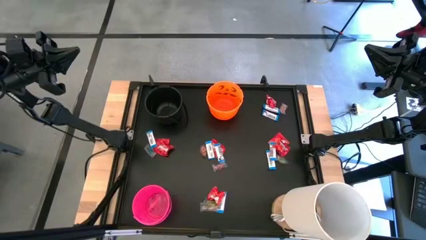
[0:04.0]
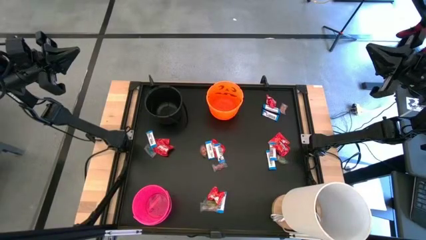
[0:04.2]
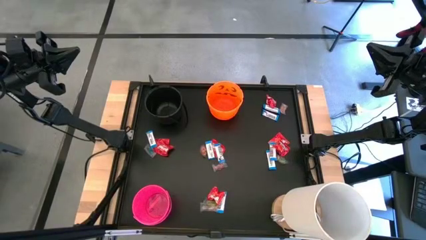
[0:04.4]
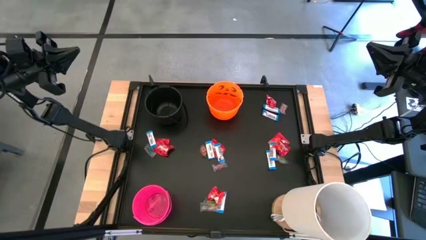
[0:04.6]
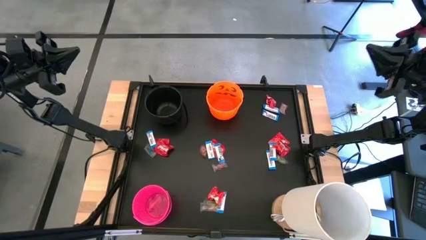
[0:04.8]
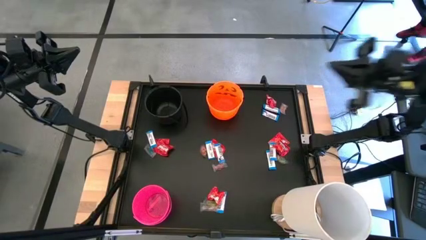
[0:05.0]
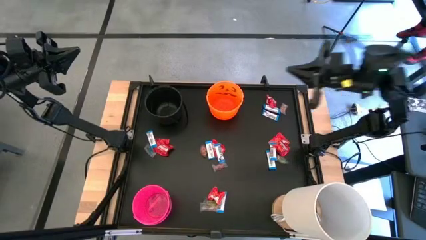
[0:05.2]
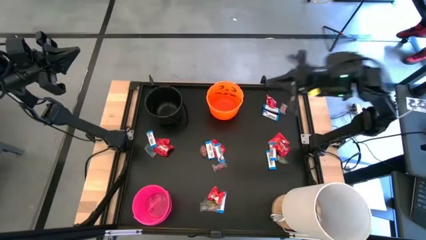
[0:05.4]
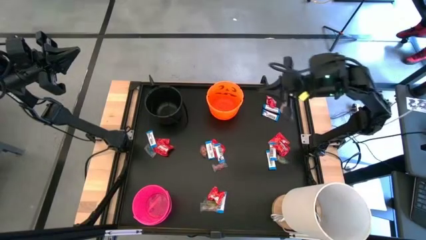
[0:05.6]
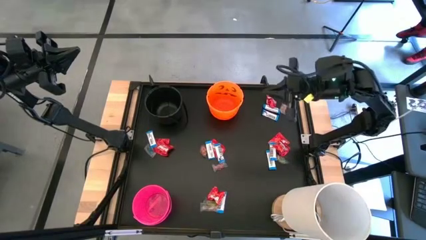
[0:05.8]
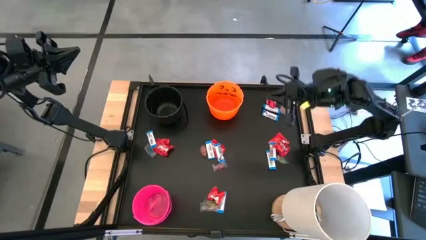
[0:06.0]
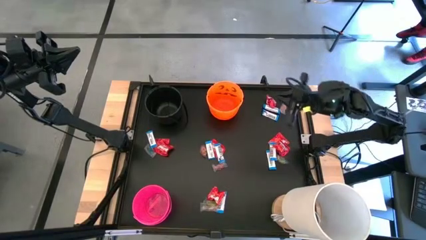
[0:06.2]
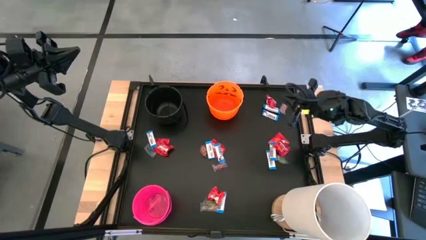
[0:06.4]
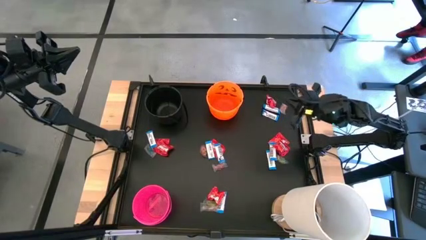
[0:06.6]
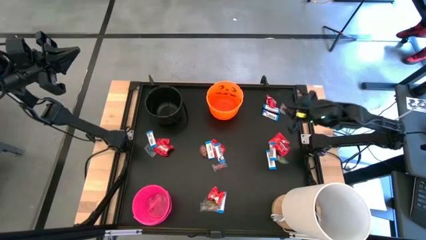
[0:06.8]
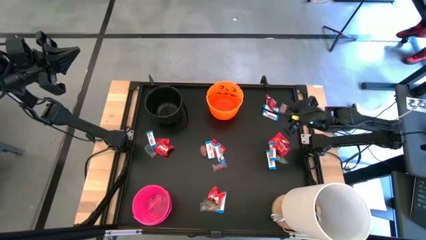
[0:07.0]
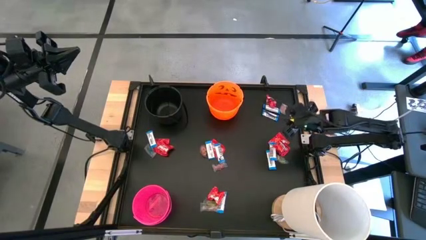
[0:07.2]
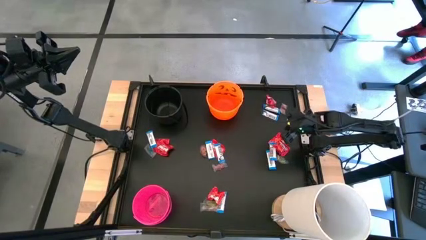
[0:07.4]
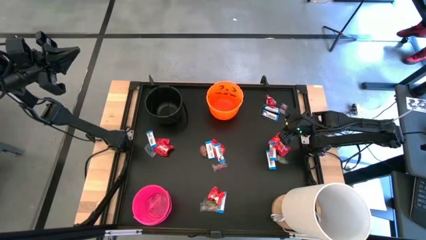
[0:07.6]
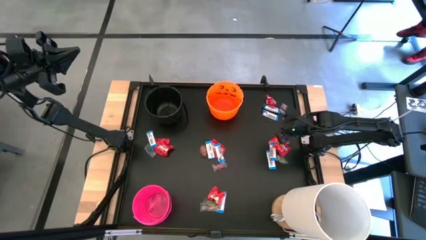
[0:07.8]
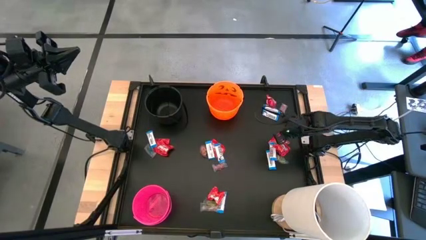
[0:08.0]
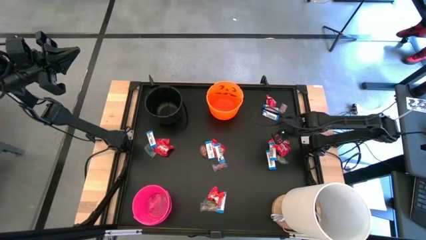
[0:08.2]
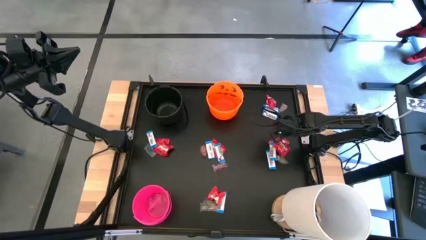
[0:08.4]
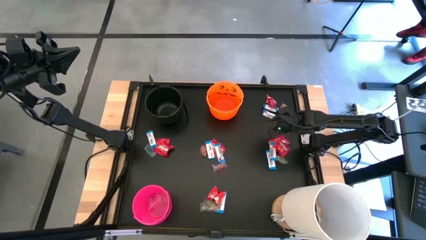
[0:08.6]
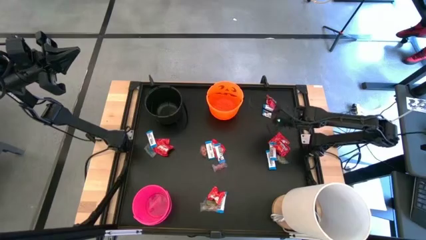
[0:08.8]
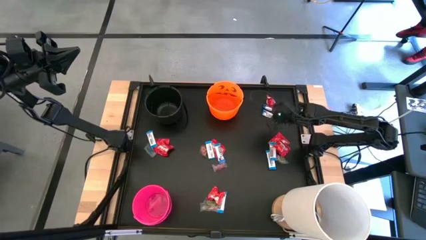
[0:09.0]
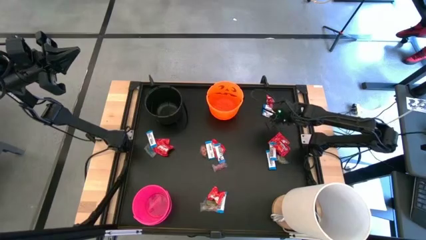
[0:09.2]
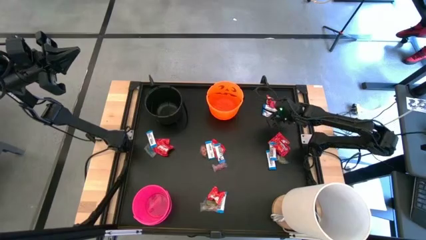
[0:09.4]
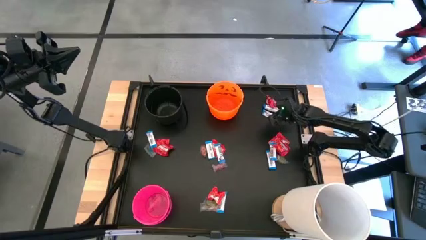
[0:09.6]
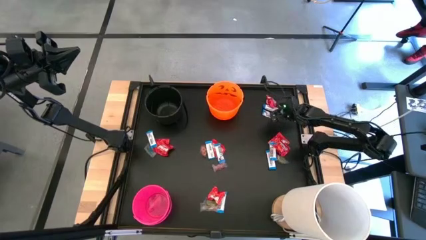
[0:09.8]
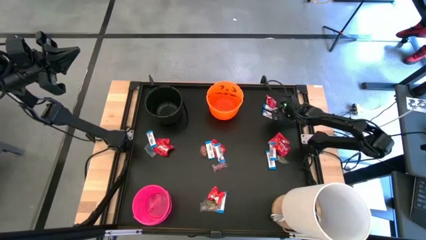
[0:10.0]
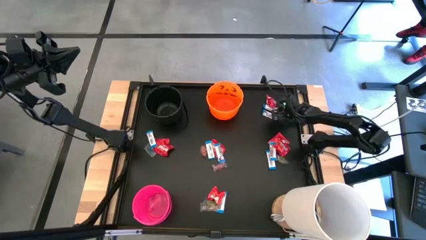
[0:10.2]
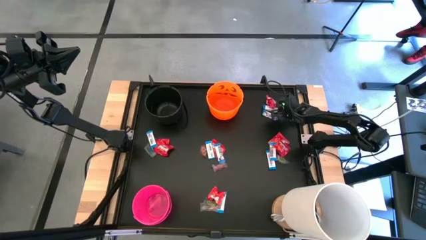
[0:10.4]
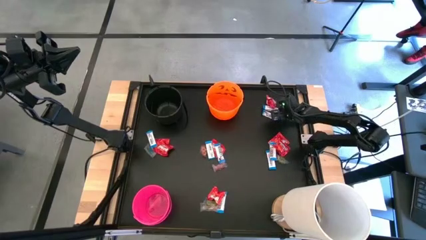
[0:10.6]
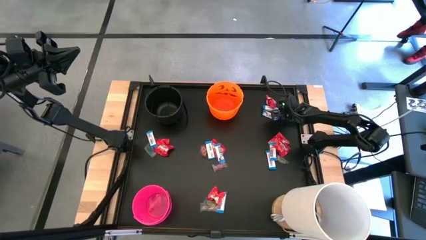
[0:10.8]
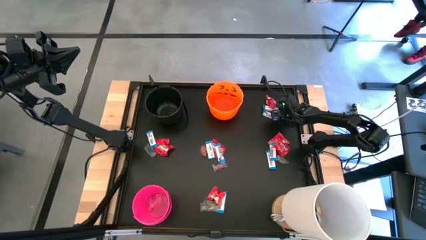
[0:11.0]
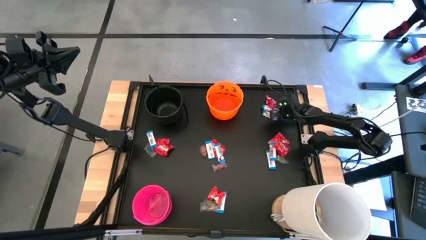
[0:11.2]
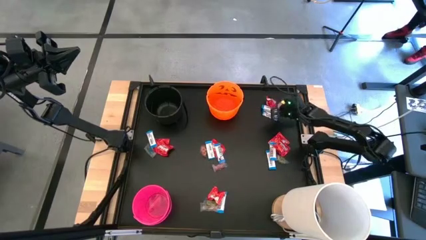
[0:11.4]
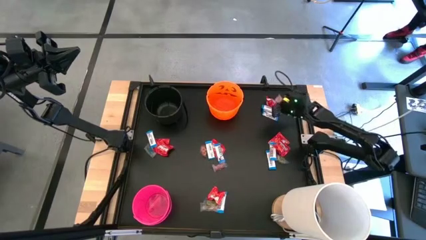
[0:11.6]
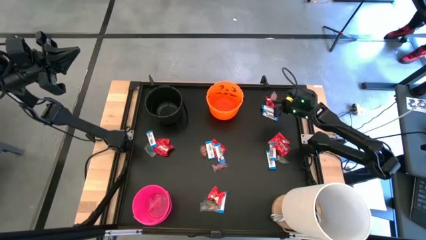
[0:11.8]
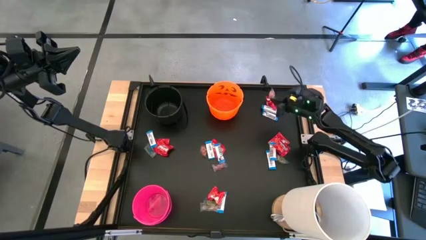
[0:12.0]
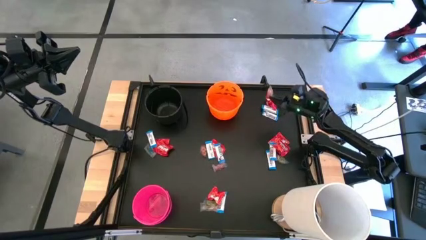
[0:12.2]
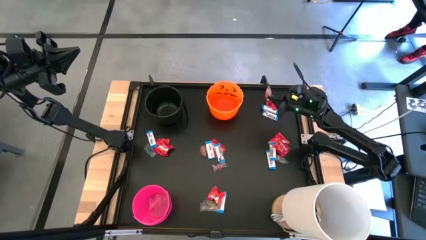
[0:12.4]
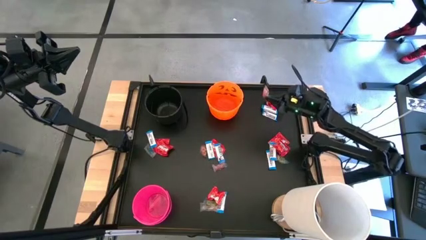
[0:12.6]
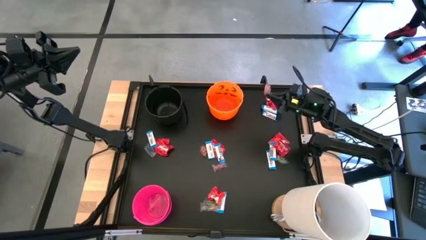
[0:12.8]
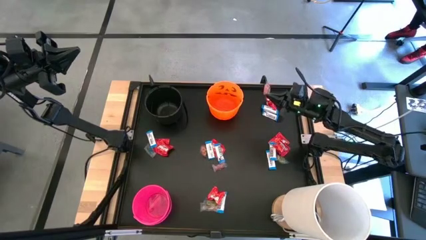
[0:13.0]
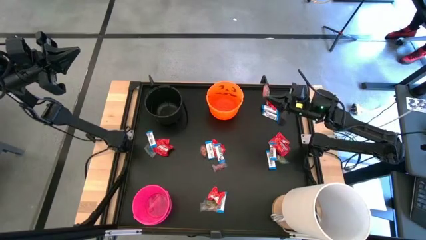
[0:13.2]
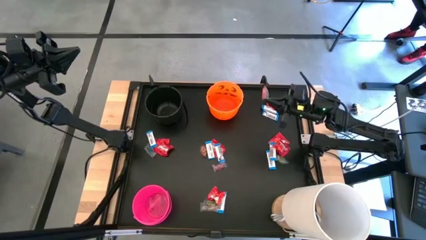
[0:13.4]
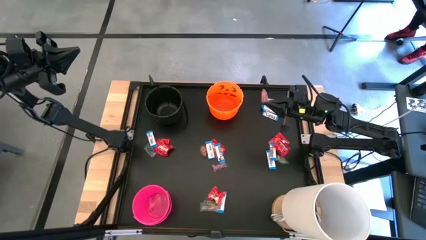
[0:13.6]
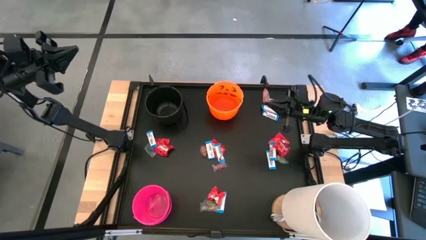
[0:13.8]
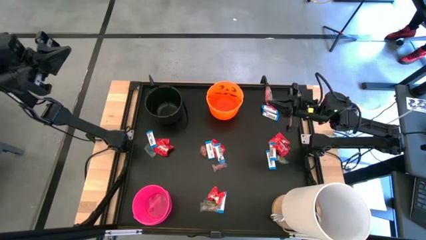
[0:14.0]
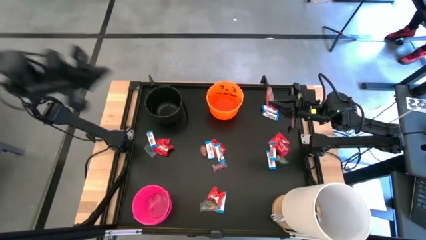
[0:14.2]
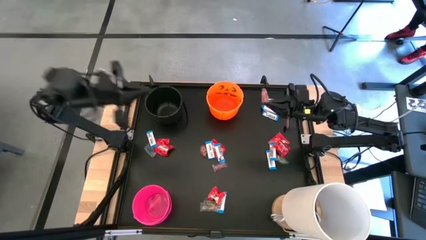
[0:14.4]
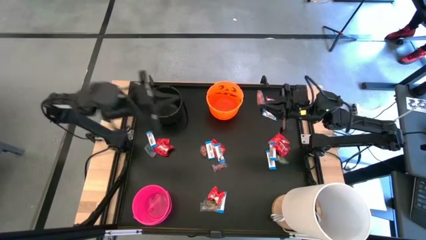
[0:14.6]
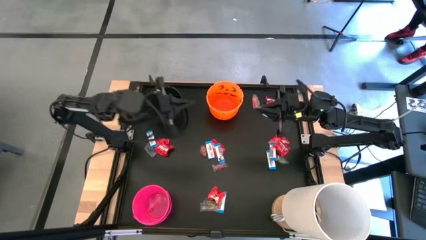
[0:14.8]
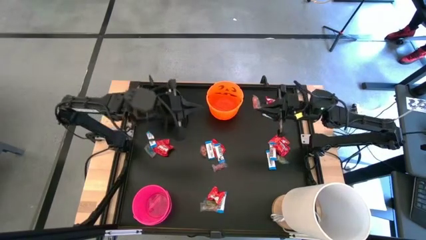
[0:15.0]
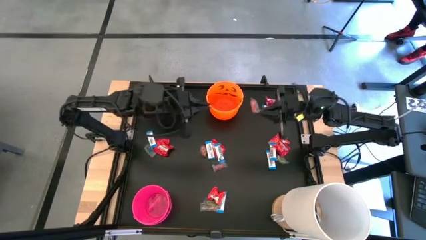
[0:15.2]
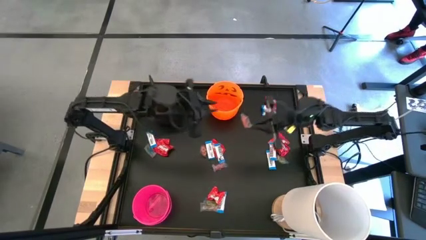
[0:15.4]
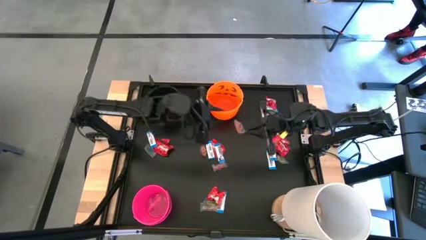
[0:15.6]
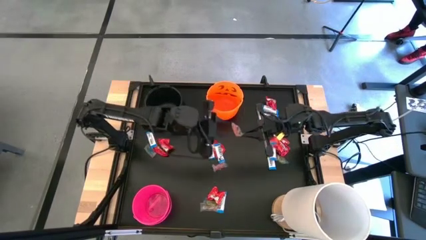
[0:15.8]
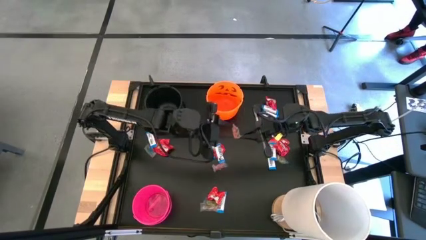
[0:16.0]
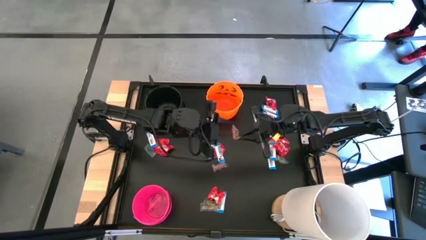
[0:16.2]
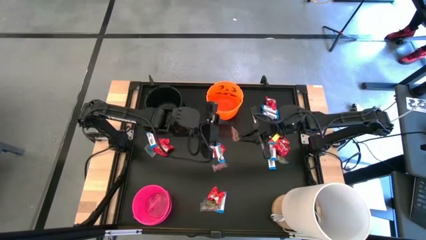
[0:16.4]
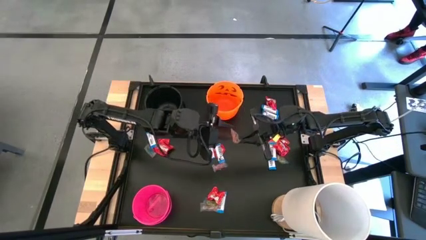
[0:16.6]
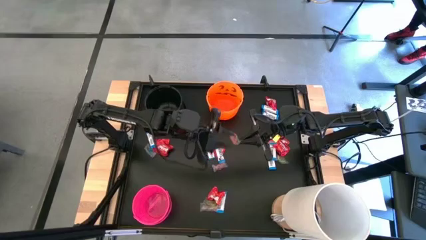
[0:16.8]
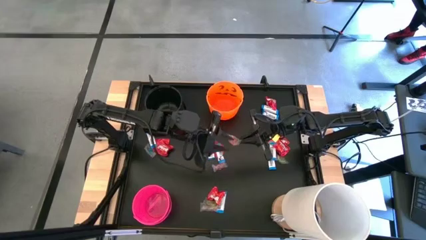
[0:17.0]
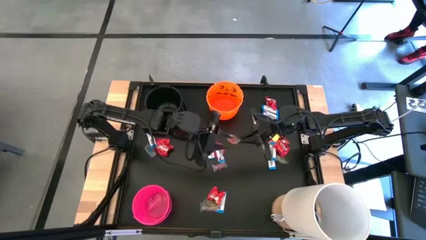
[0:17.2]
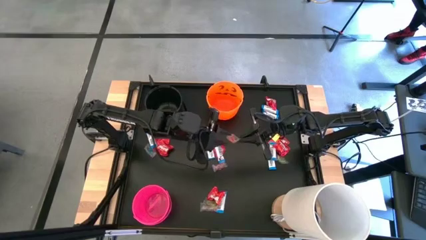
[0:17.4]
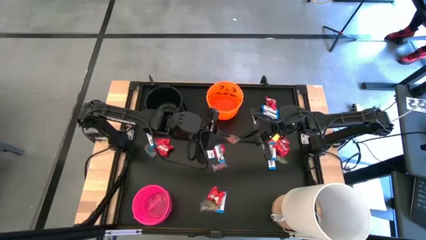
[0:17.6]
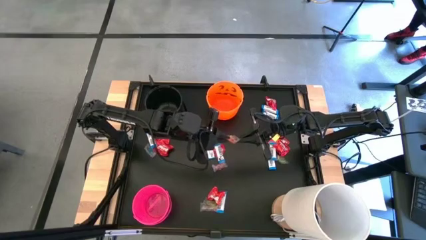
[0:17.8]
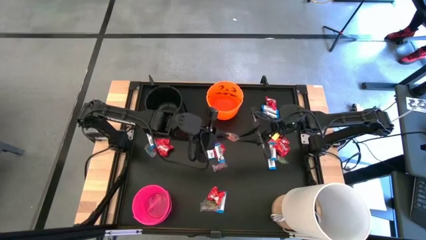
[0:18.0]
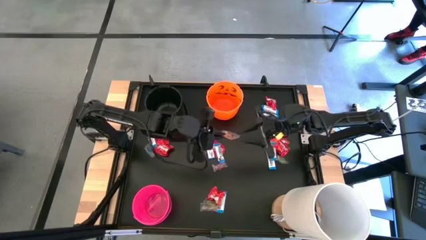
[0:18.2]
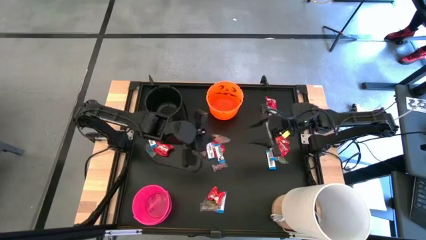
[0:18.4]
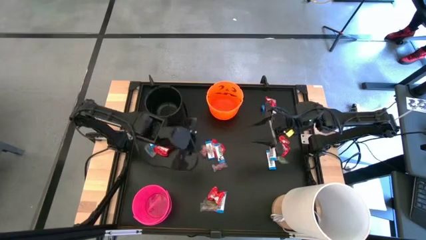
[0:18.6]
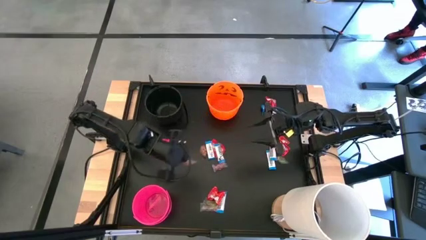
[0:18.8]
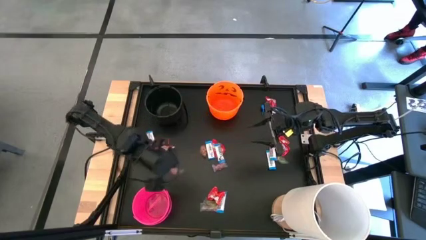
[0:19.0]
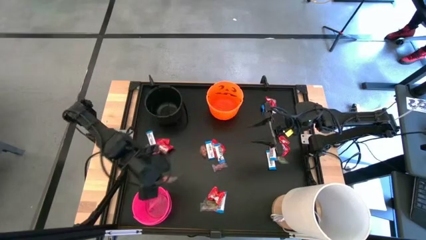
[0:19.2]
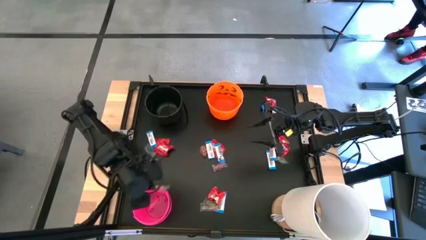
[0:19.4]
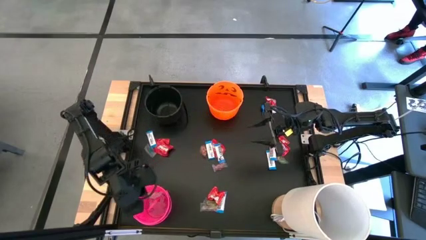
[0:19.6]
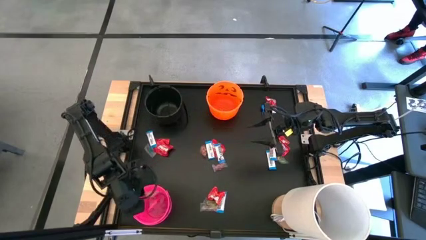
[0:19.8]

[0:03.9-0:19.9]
Task: Sort candy
Put the top right transparent candy into the pink bin
